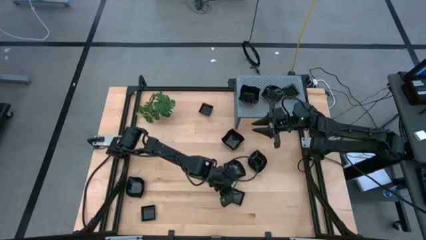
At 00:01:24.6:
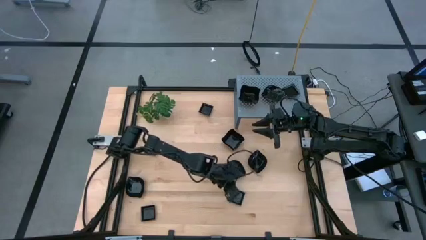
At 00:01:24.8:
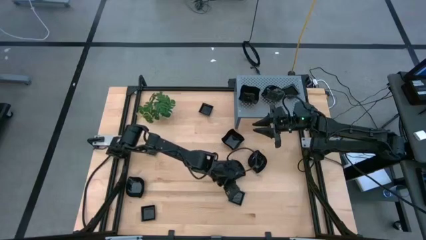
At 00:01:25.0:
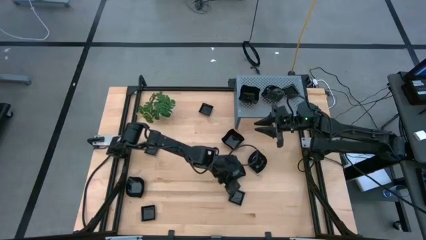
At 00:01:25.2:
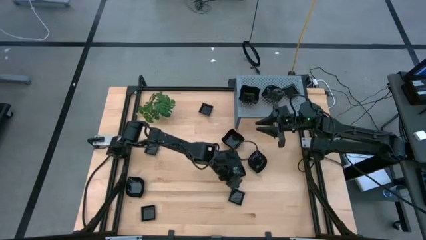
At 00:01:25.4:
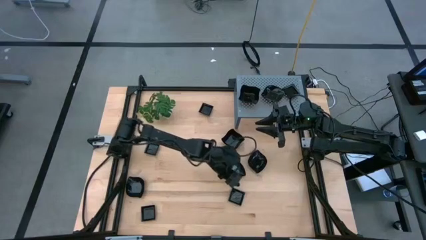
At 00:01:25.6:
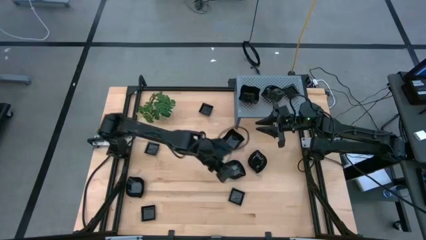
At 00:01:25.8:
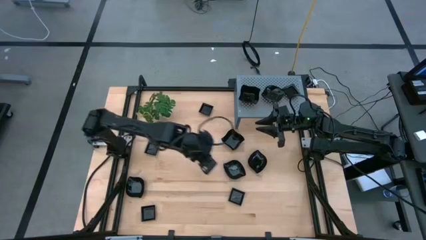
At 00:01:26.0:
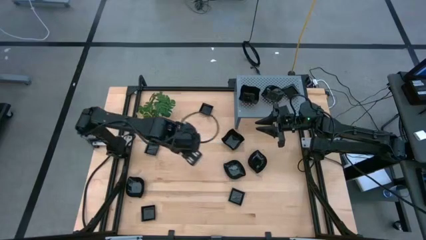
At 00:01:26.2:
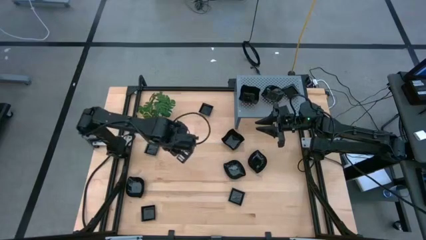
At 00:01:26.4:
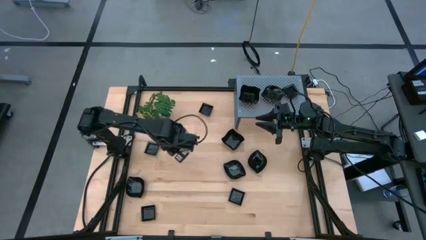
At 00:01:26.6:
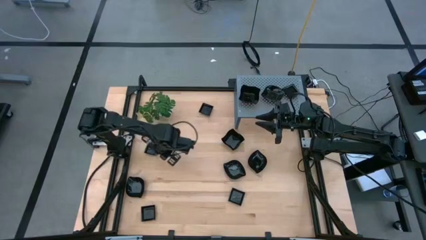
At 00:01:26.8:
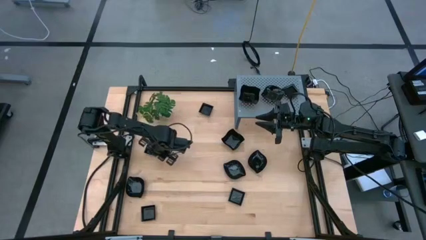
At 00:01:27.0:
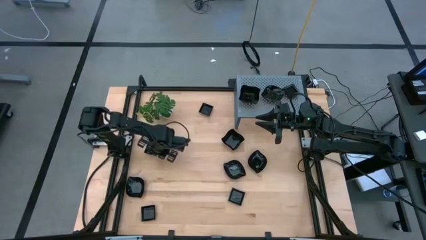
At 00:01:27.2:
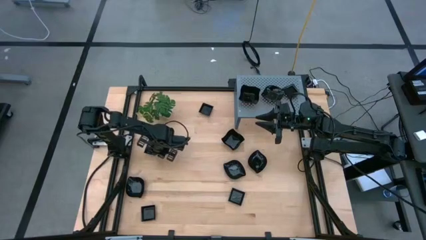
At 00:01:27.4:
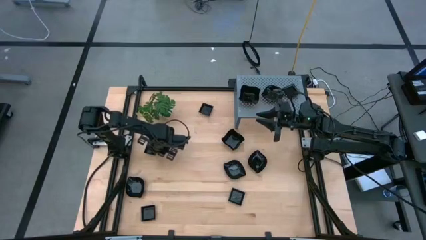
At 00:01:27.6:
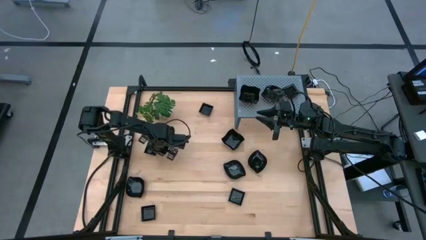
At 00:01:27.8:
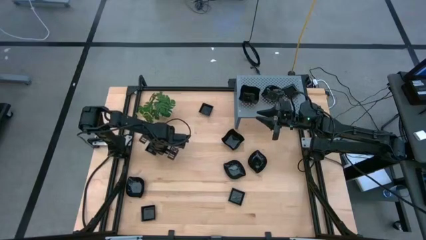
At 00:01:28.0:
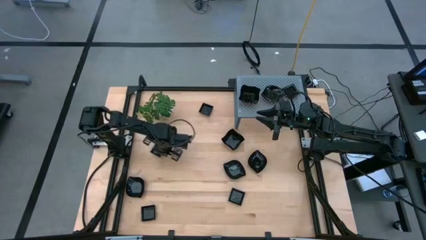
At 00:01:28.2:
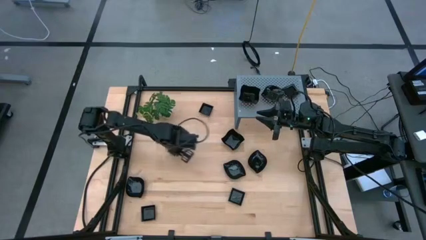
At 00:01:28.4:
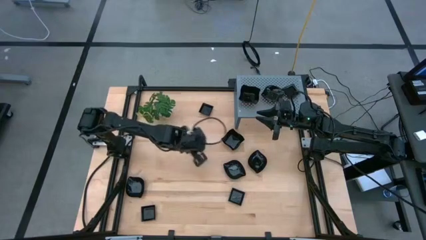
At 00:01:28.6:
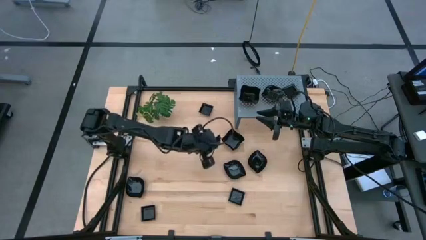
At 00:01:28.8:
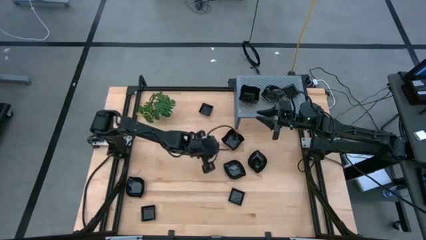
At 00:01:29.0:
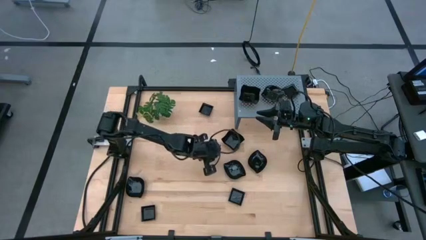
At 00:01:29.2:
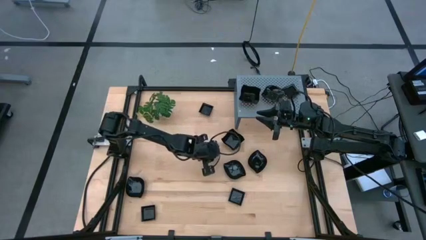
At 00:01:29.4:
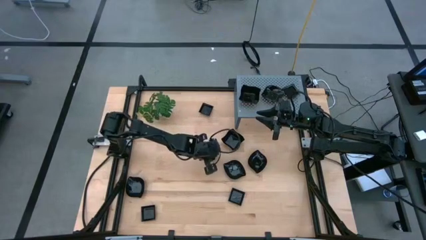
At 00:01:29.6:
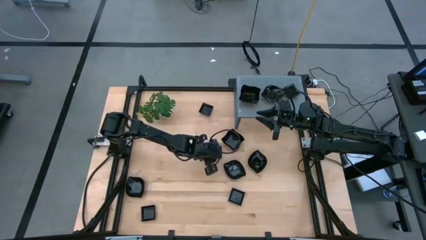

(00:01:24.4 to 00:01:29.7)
Task: Pick & Place Mini shaped plates
Move the square plate to the center of the table

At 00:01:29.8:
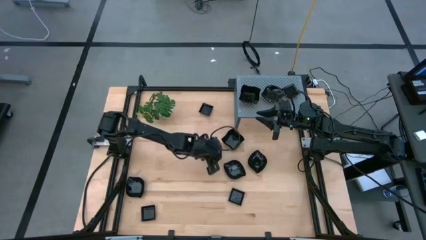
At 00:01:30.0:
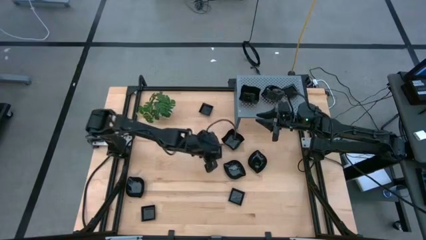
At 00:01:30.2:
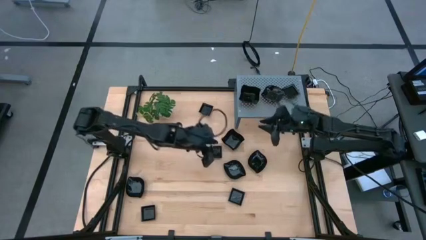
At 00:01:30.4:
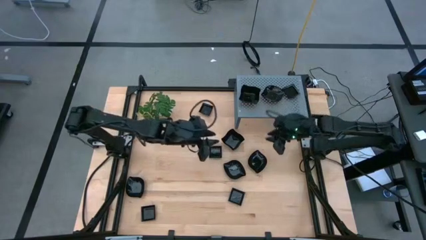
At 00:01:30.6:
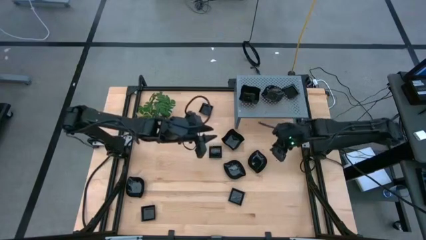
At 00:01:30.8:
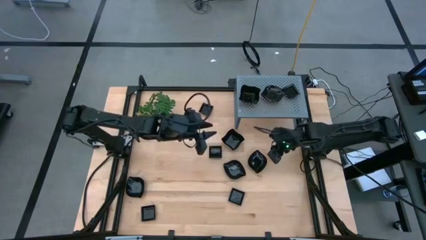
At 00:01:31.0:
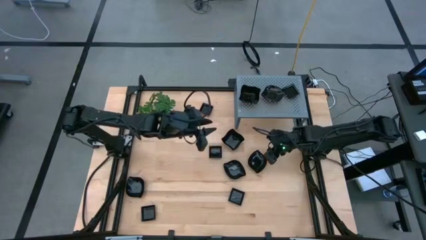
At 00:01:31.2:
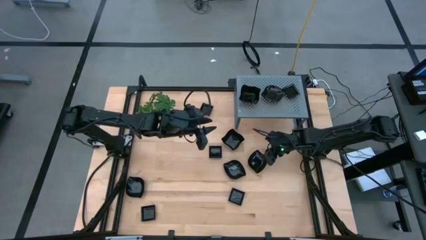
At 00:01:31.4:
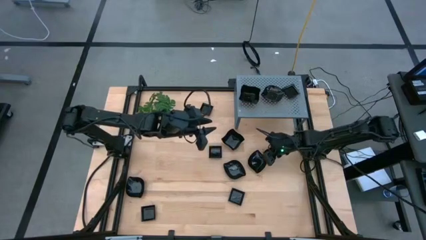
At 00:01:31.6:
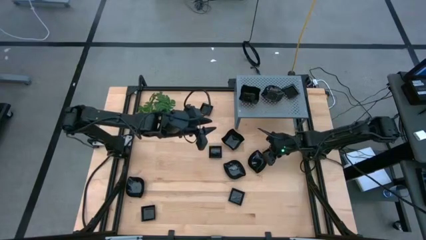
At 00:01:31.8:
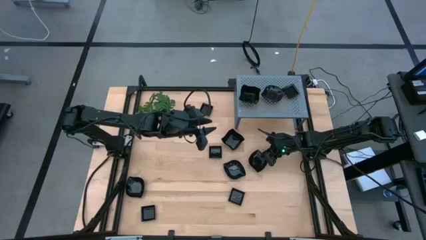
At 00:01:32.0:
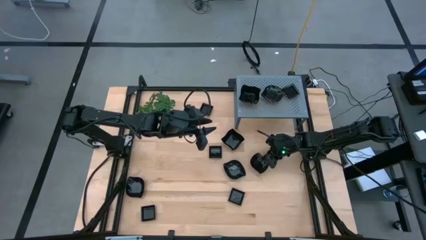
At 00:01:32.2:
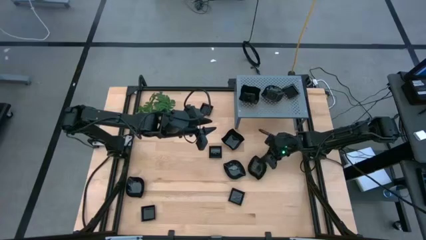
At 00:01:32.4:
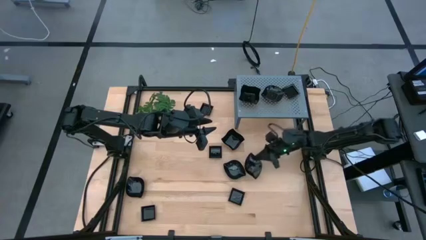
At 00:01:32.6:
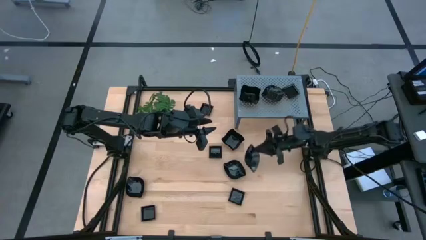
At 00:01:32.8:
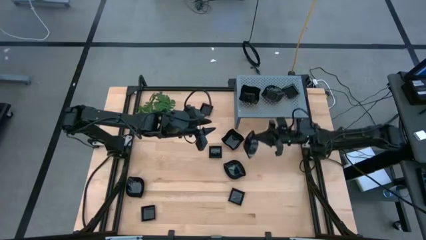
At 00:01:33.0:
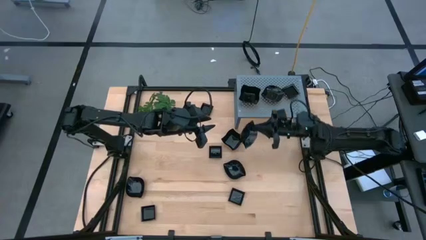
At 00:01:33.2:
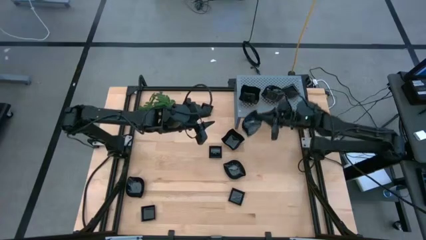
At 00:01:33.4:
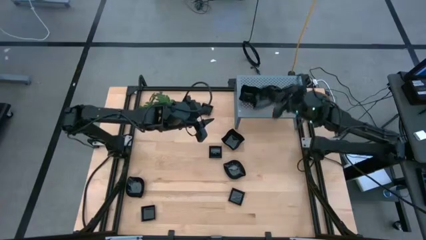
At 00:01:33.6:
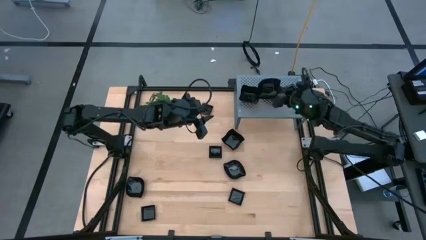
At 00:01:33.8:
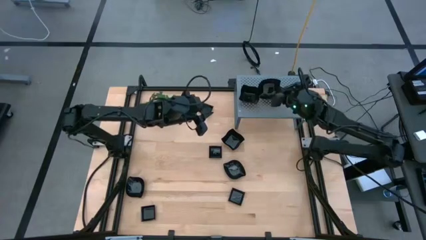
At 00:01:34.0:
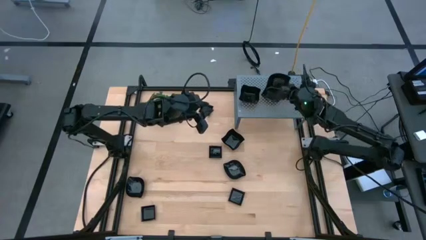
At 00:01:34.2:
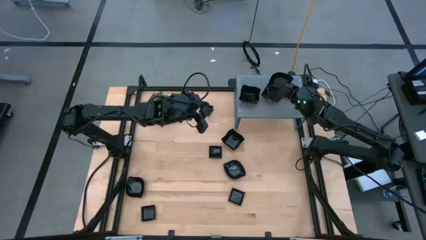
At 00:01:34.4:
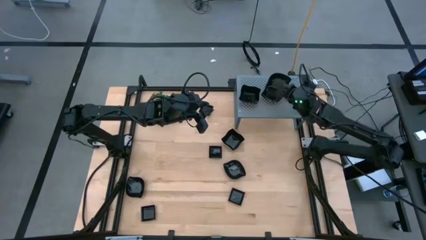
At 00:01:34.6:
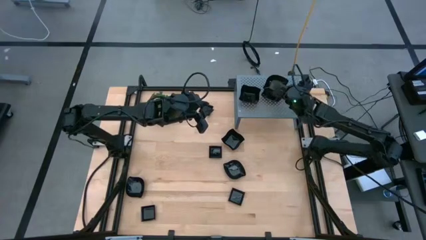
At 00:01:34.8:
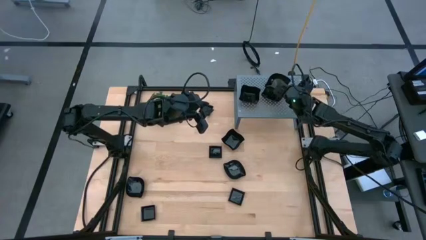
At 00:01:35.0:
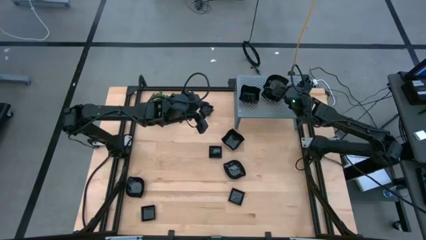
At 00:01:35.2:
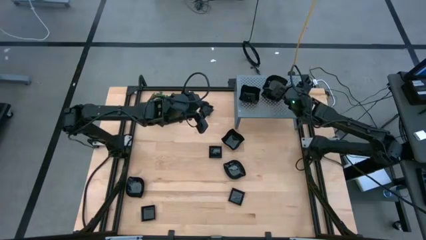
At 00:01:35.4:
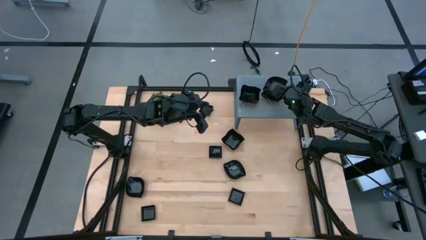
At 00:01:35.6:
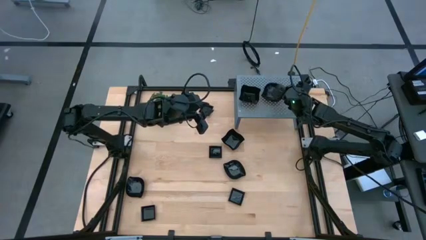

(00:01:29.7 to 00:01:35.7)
Stack the leaf shaped plate on top of the leaf shaped plates on the shelf

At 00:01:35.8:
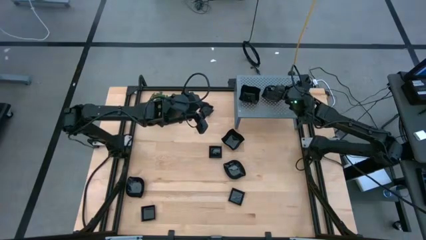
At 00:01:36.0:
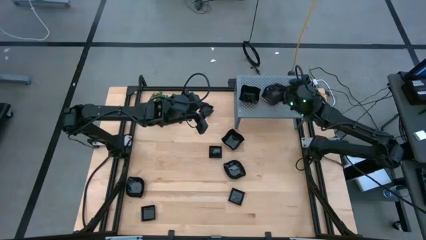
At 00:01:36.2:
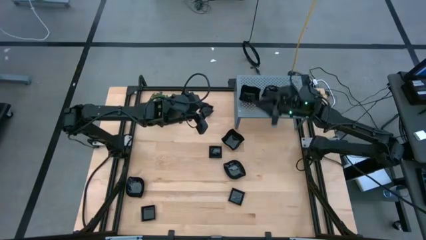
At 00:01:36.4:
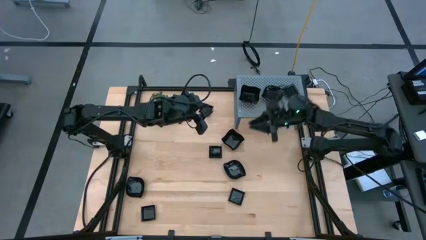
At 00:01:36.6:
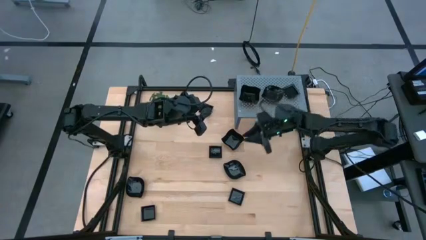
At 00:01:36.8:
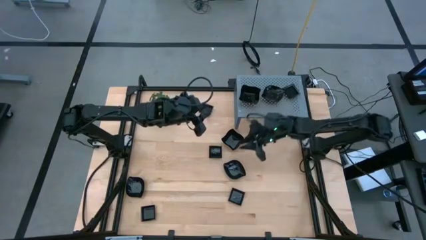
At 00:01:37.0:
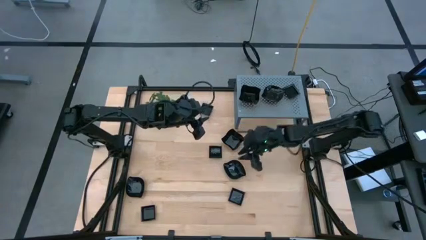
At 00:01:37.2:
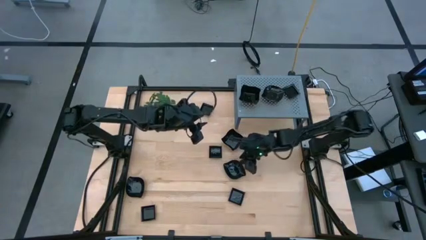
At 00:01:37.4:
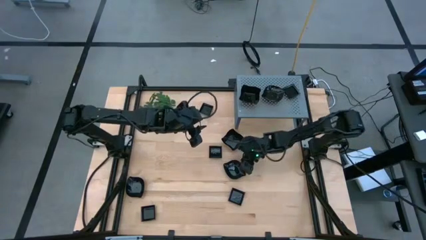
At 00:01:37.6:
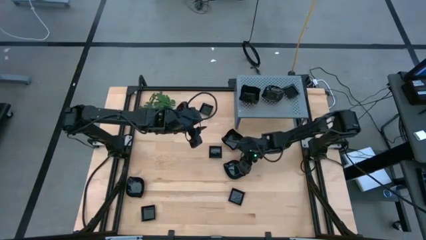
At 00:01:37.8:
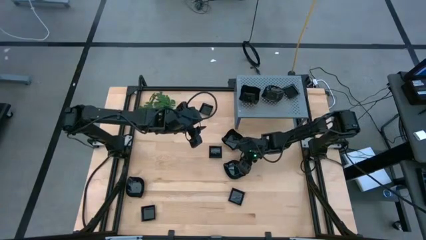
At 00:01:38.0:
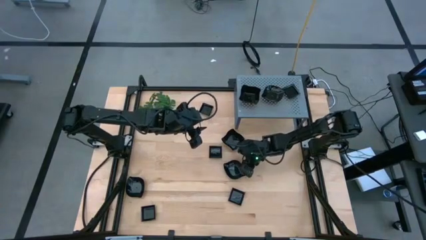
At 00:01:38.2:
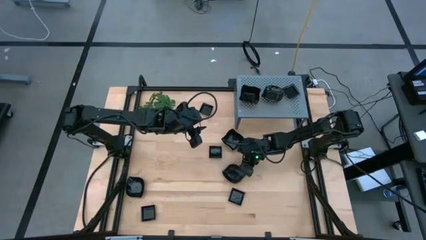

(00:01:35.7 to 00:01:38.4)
Stack the leaf shaped plate on top of the leaf shaped plates on the shelf
